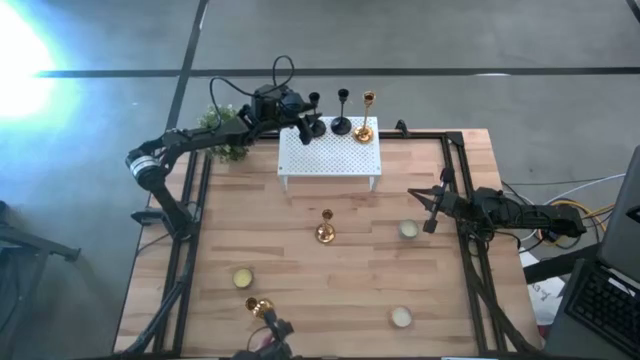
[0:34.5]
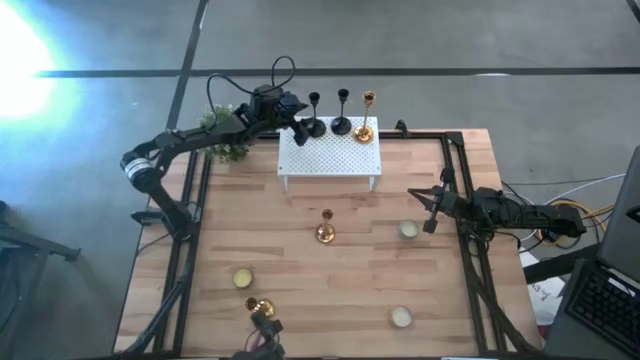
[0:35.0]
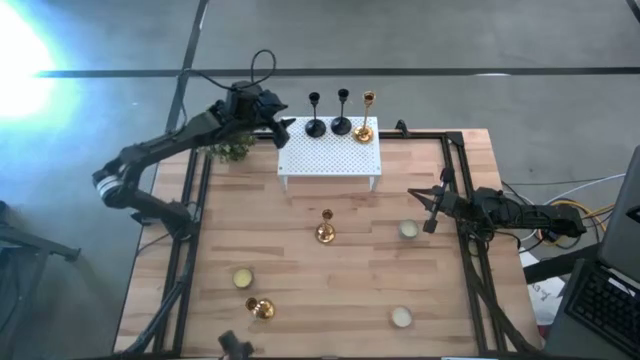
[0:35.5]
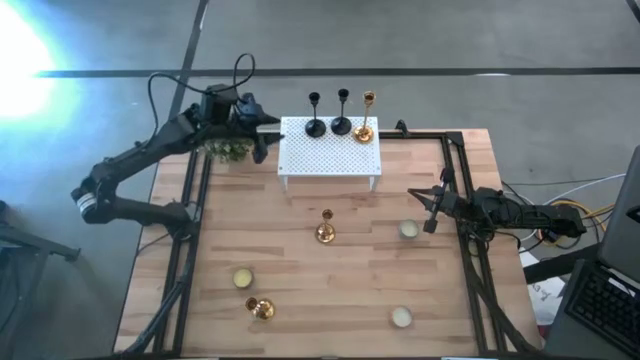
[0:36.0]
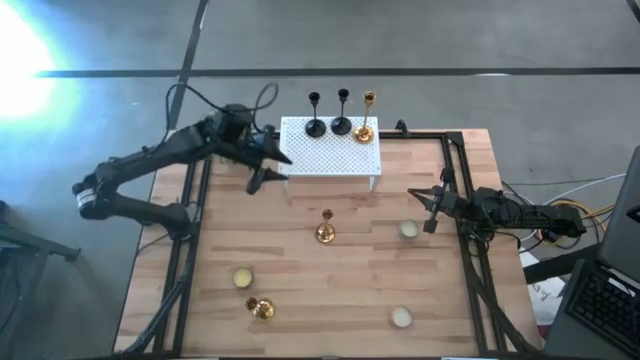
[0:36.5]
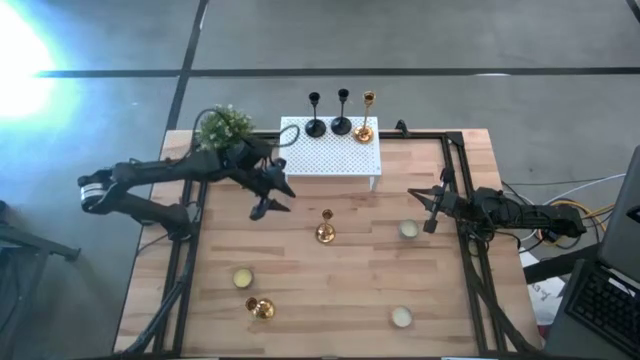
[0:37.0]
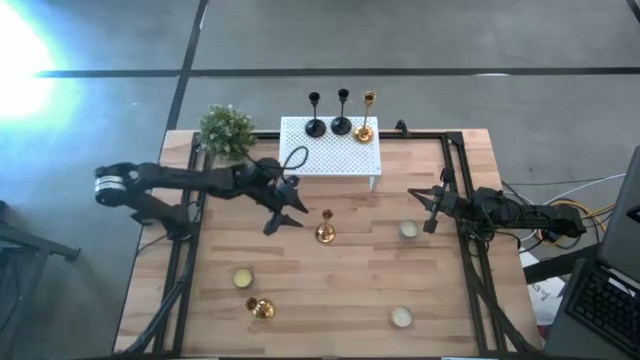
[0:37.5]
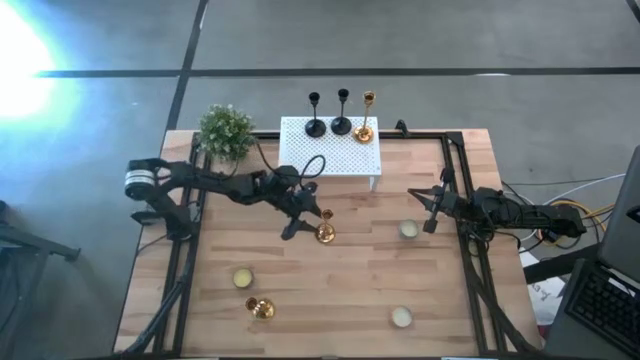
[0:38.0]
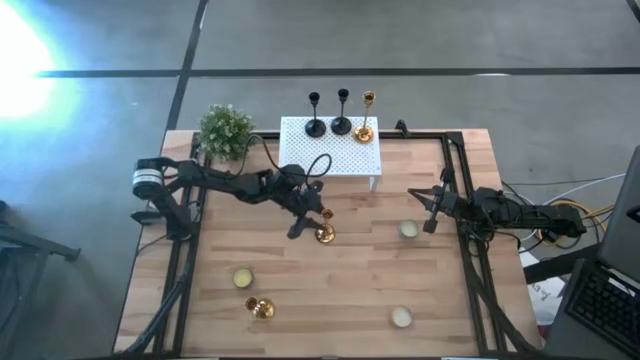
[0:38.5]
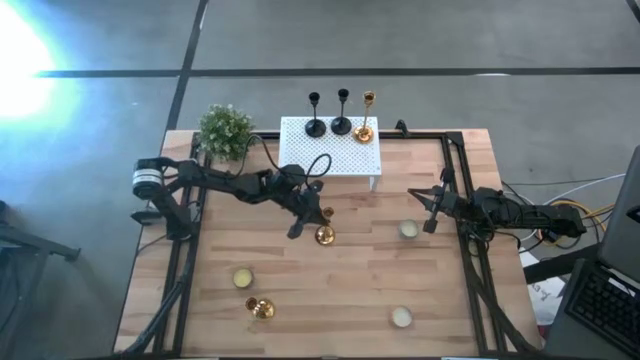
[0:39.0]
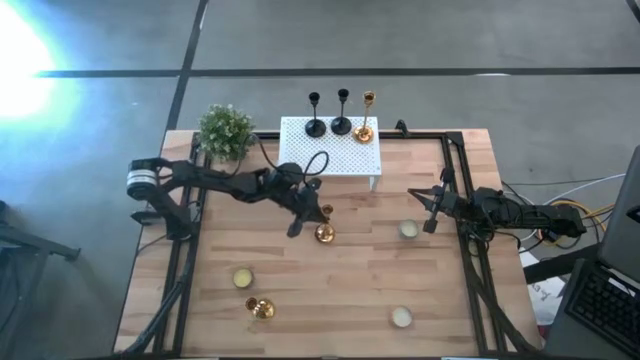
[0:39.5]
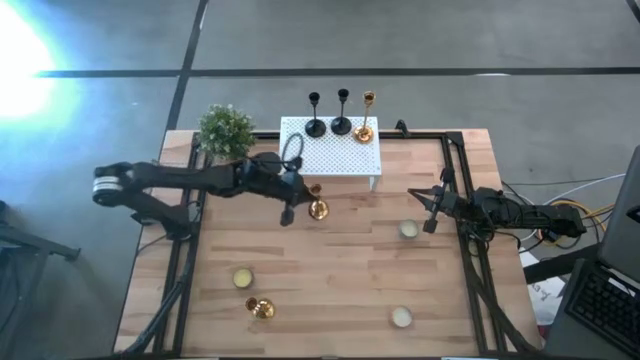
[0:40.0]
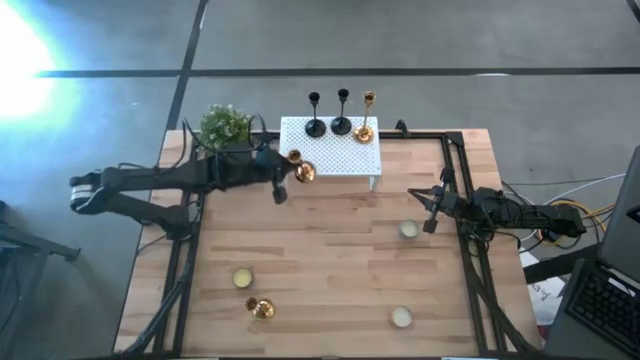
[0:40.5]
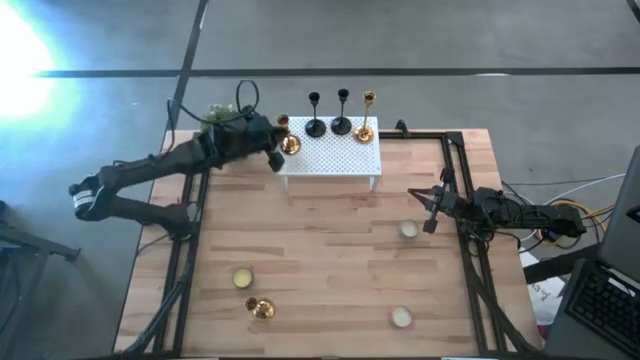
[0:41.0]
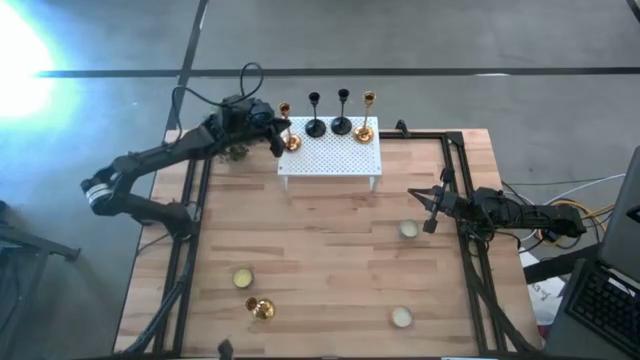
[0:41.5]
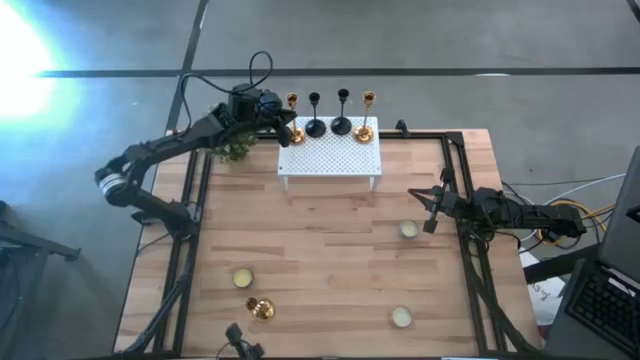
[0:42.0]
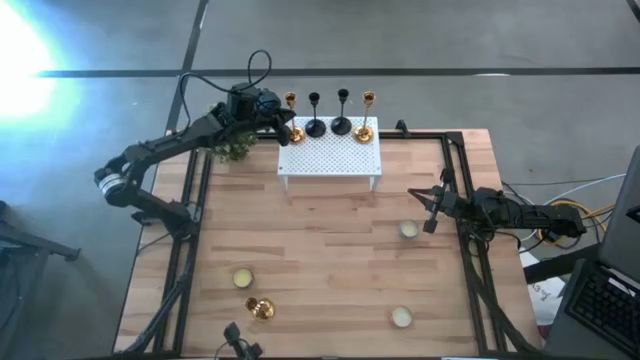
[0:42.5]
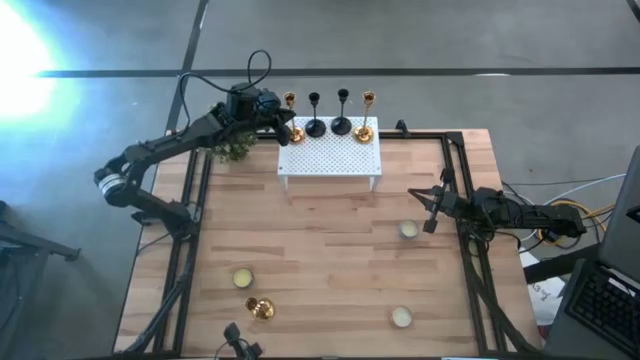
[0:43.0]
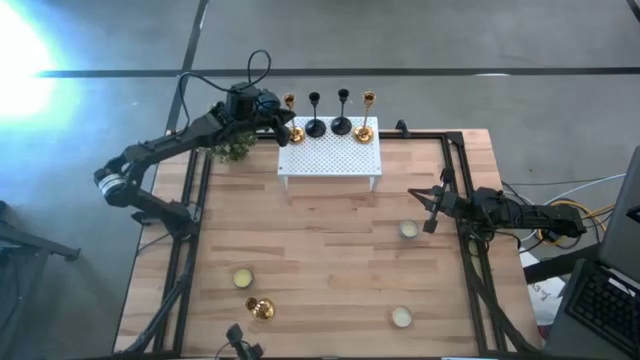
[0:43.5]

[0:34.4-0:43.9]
Task: Pick & Place candle stick holders
Put the top gold candle holder on the shelf

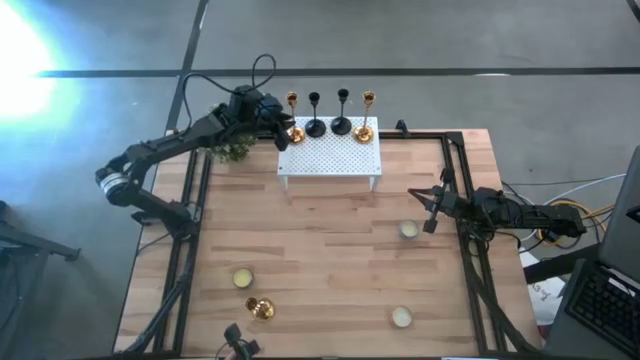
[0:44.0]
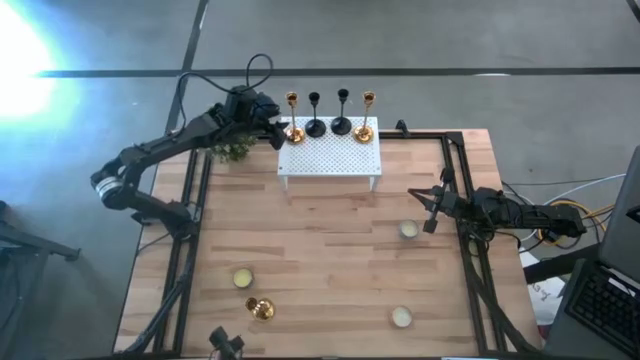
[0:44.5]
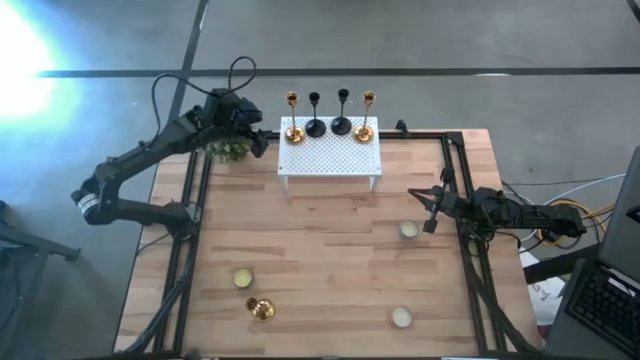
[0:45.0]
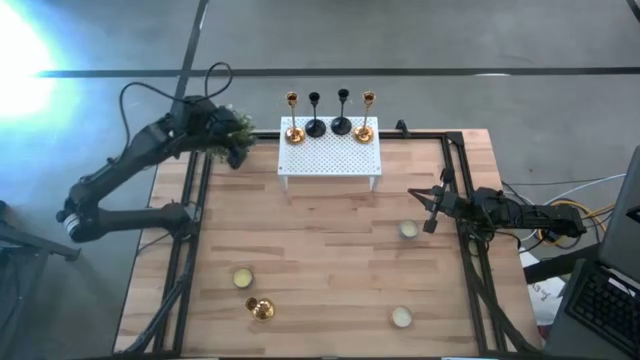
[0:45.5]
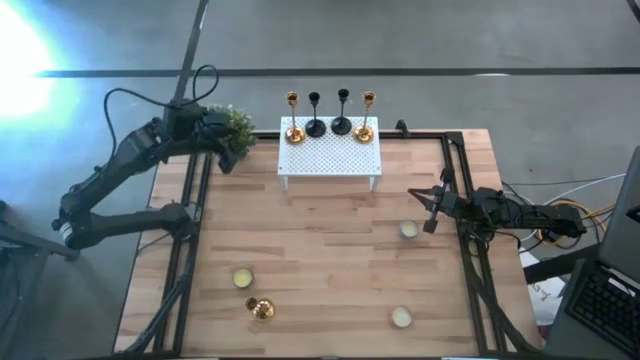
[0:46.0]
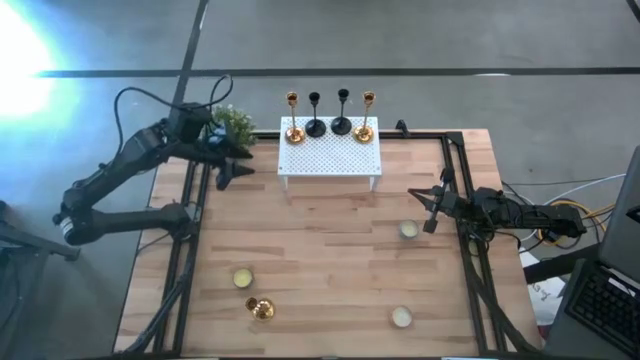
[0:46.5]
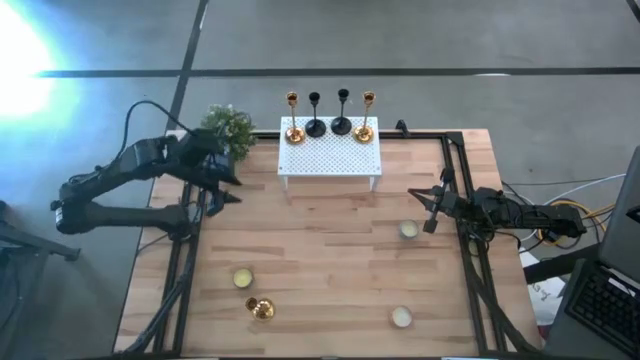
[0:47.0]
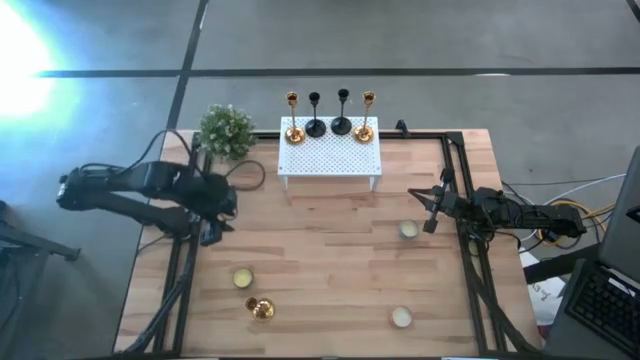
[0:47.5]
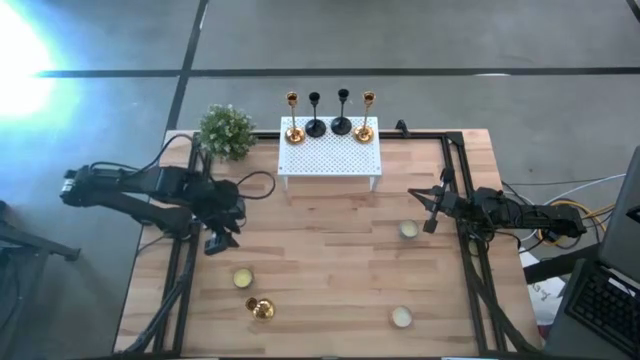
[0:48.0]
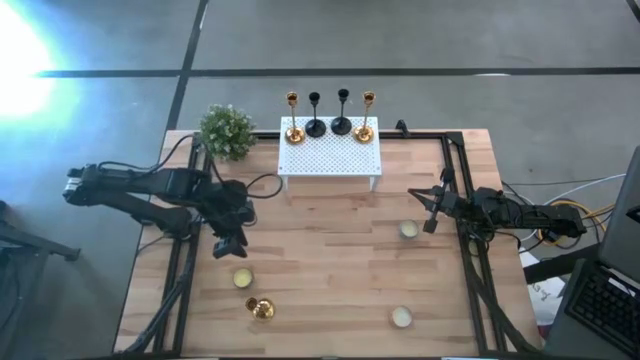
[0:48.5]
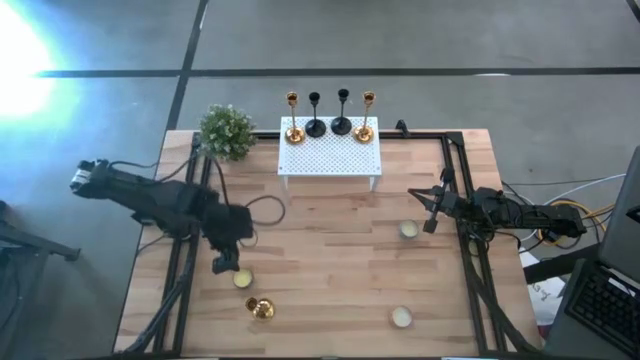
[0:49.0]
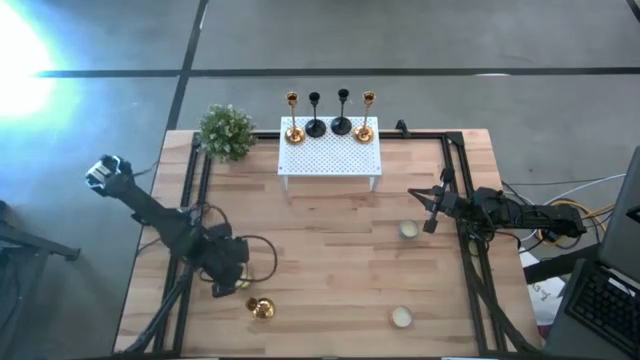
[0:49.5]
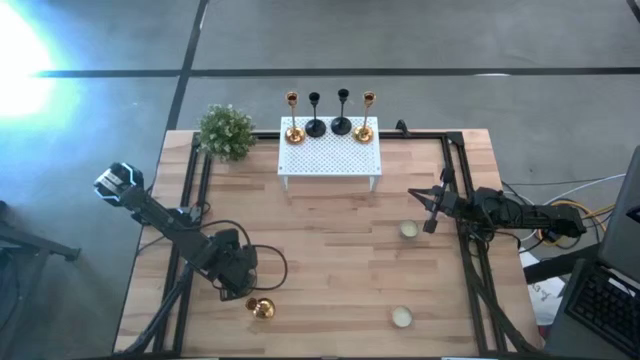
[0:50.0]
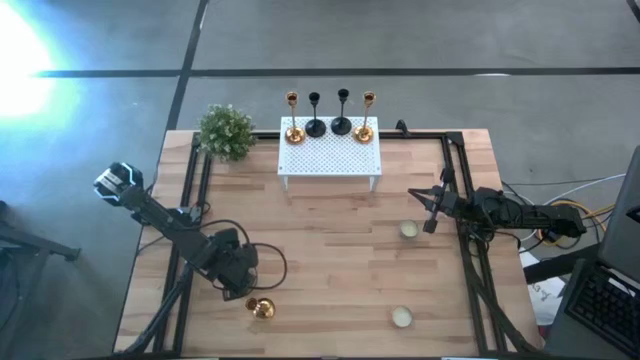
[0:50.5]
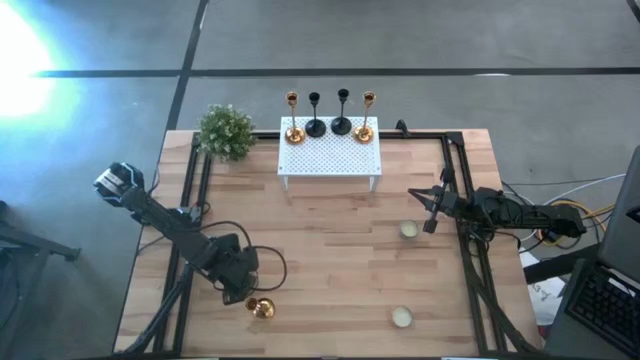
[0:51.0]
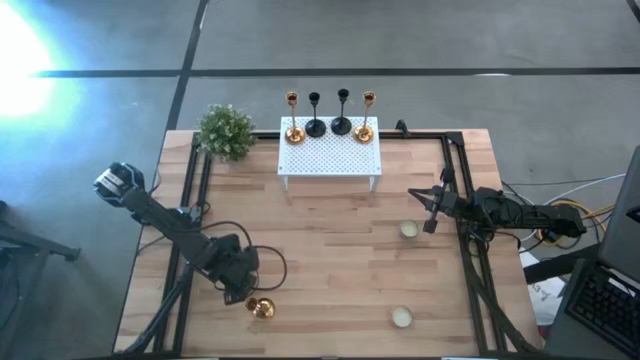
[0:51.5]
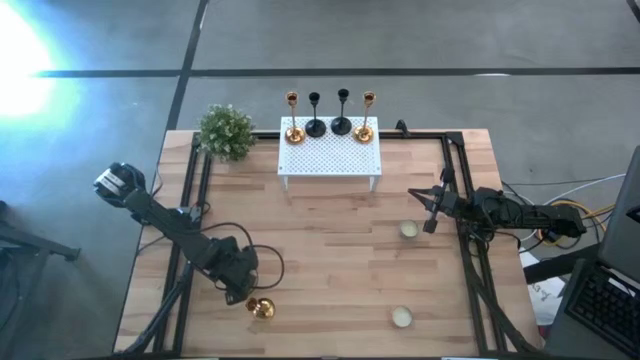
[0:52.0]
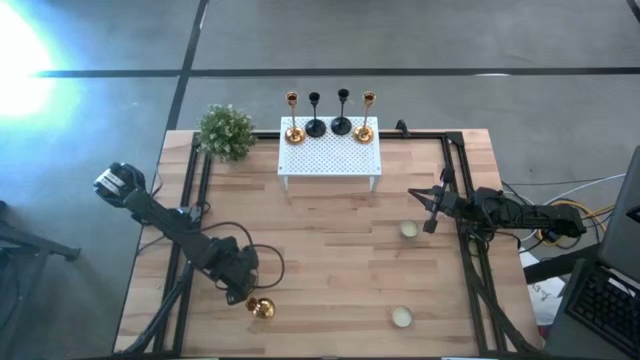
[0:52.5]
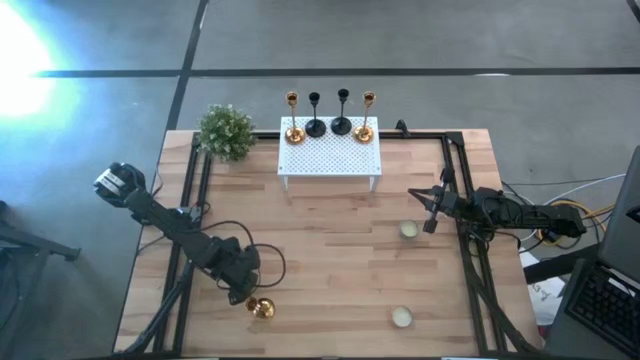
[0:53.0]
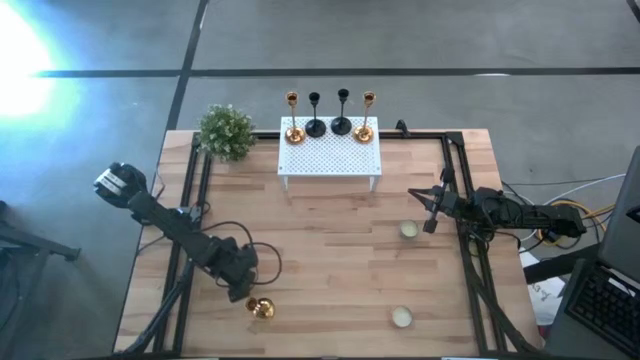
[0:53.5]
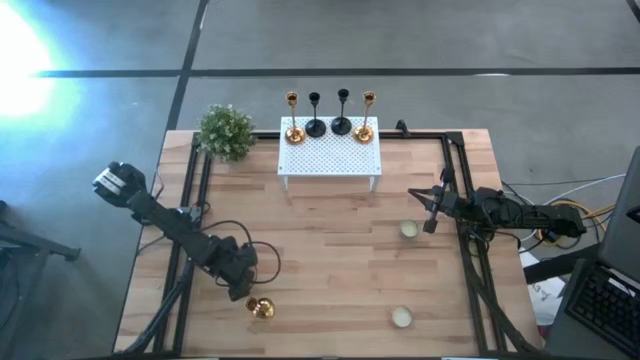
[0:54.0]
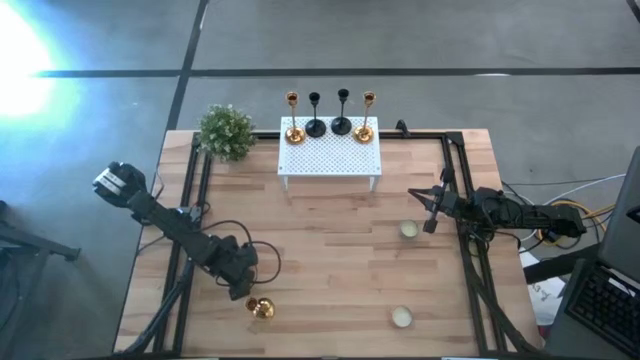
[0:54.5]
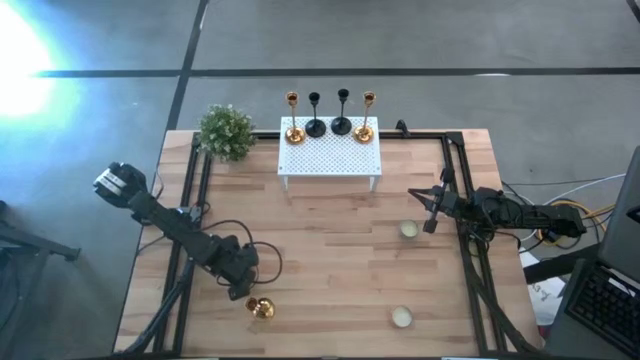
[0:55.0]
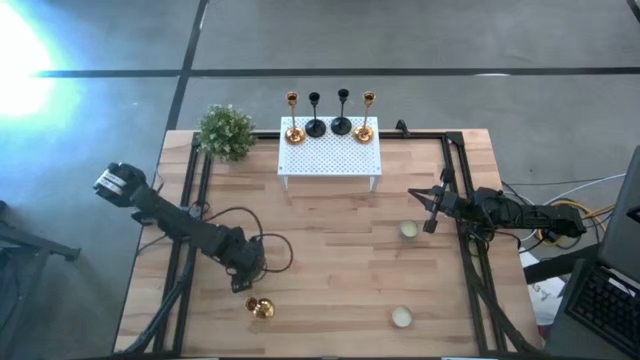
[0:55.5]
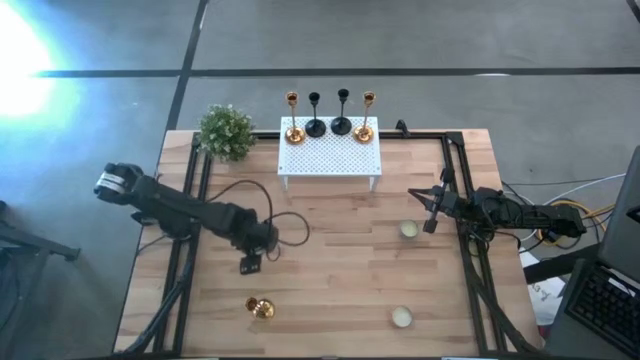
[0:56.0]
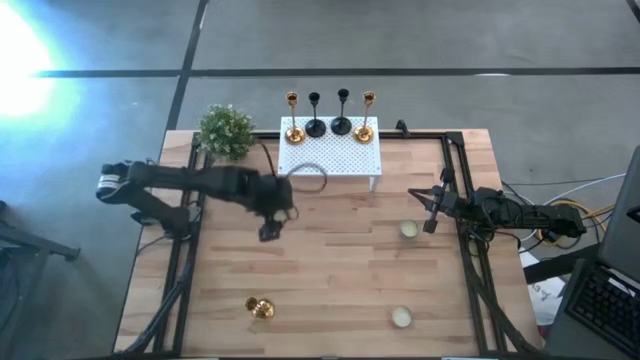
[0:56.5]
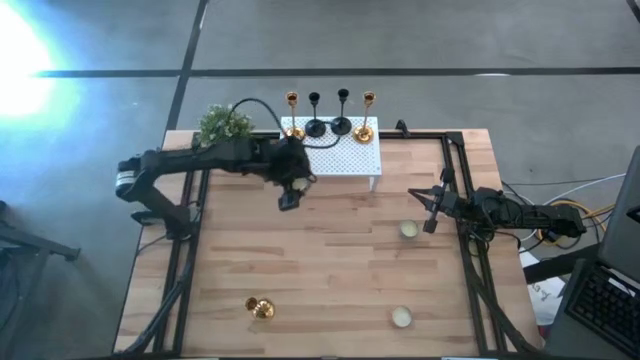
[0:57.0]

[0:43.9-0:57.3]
Put the black scented candle on the shelf
